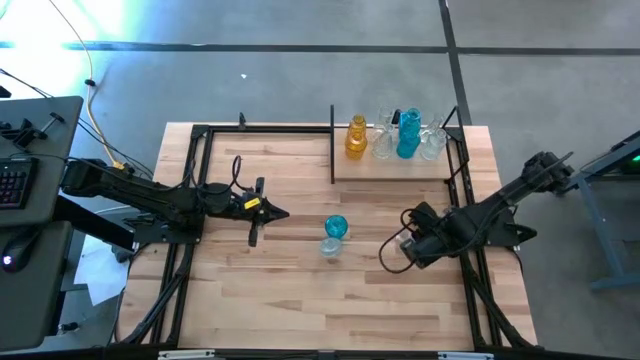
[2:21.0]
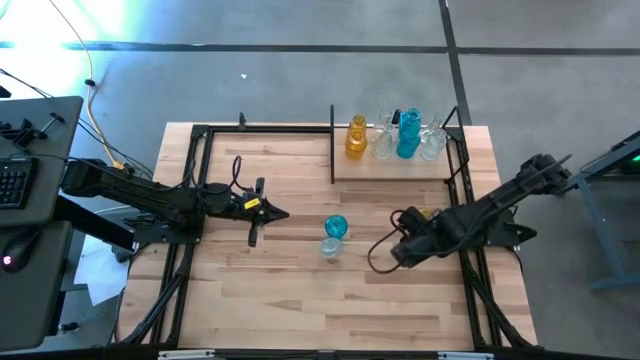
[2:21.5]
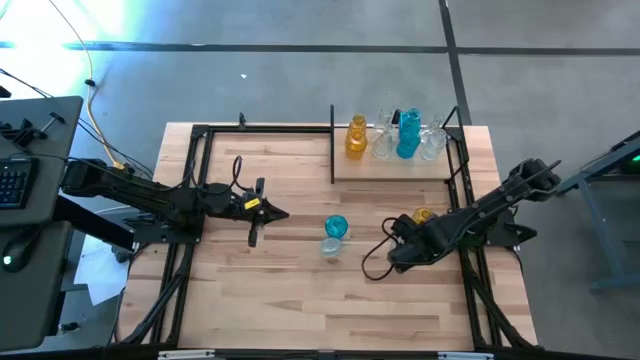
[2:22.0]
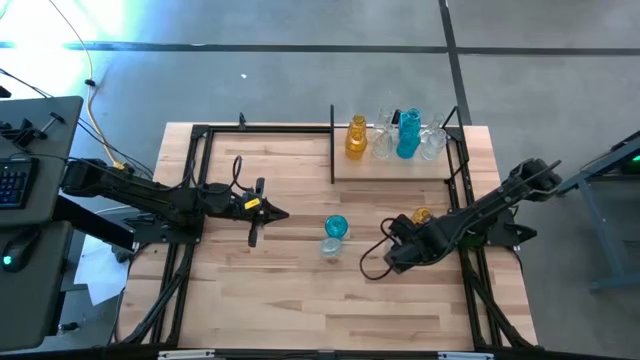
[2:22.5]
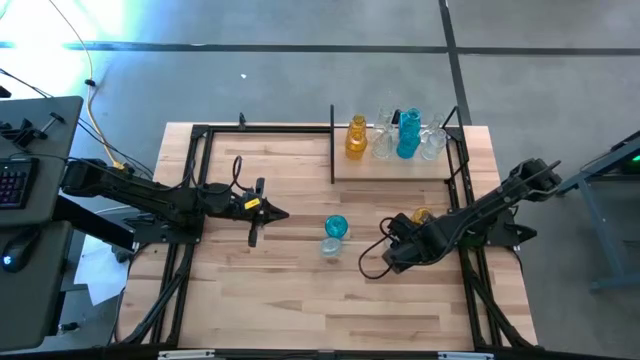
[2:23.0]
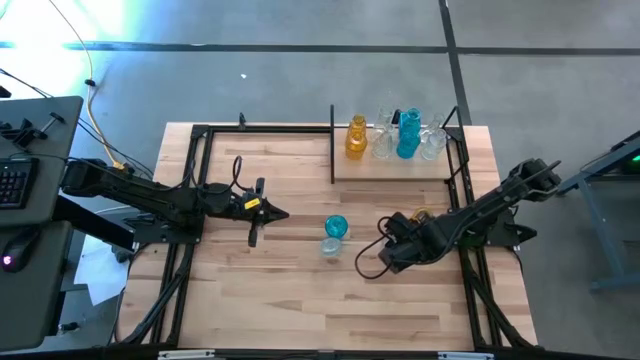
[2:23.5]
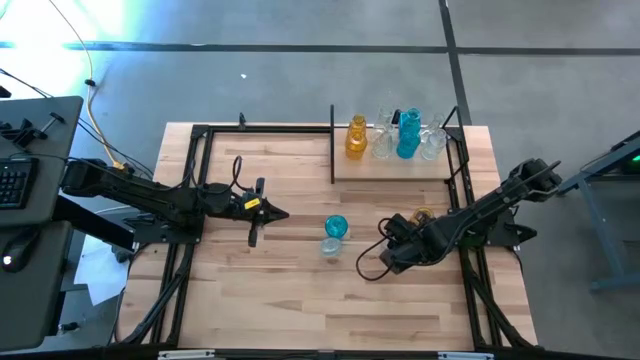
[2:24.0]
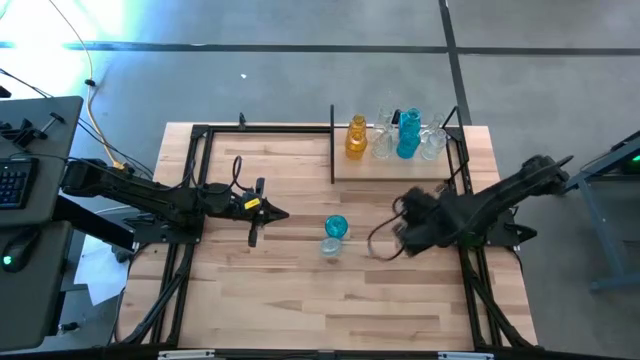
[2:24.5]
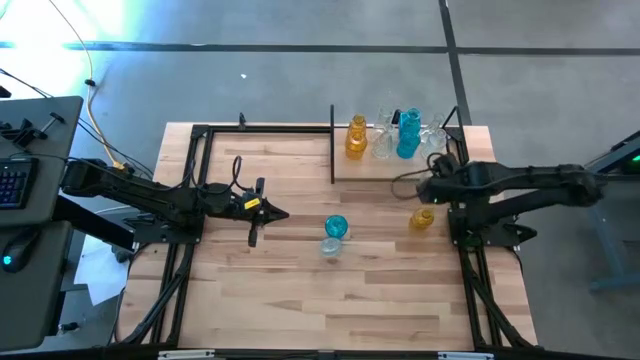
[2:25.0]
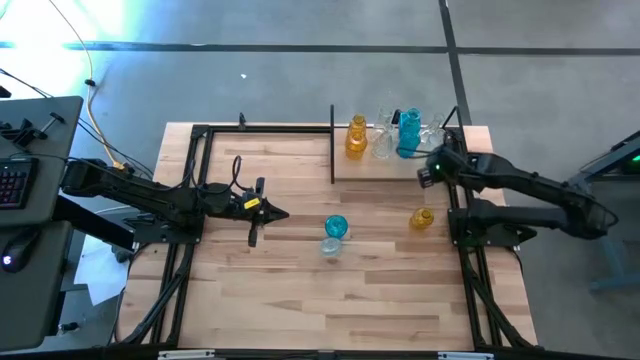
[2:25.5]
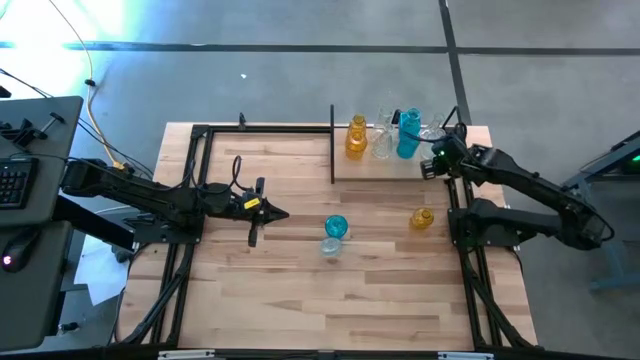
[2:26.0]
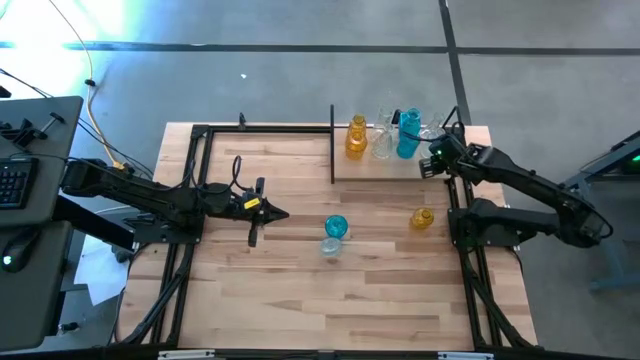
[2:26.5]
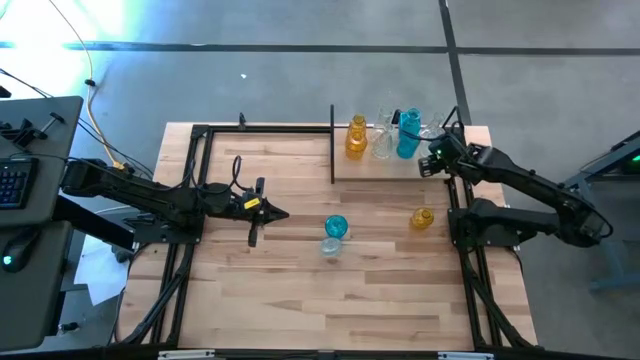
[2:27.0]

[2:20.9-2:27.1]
Task: sort vases onto shelf
Put the right transparent vase on the shelf aligned with the other transparent vase

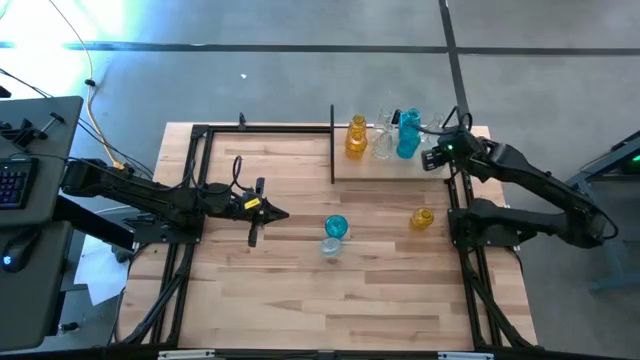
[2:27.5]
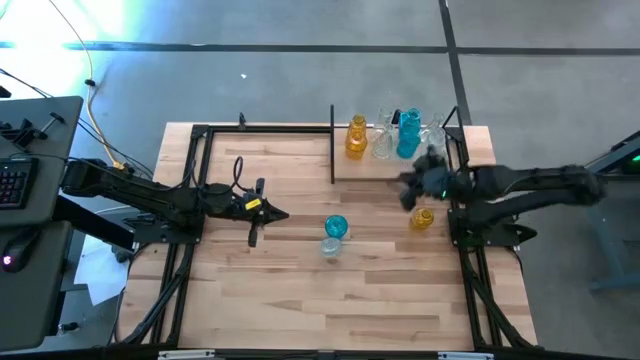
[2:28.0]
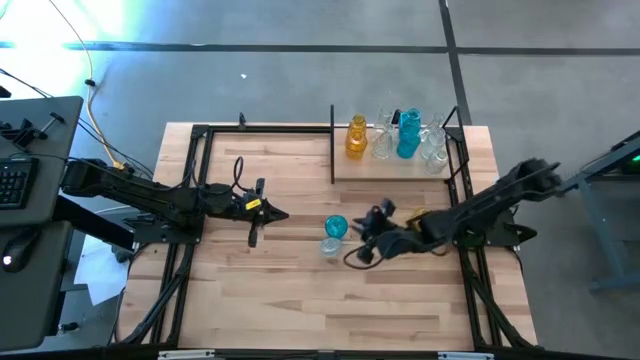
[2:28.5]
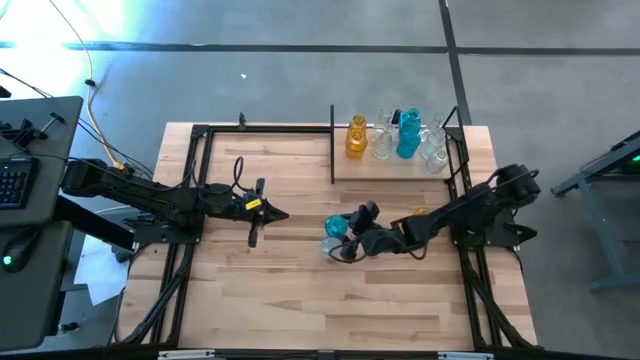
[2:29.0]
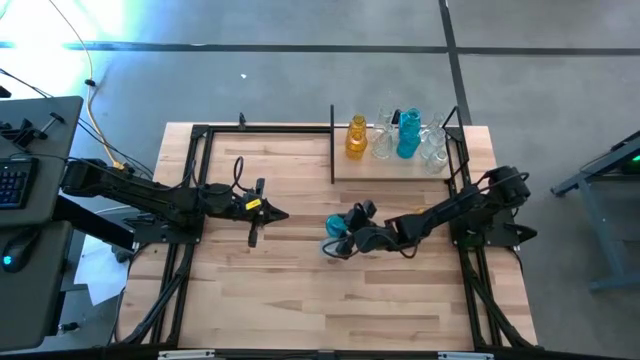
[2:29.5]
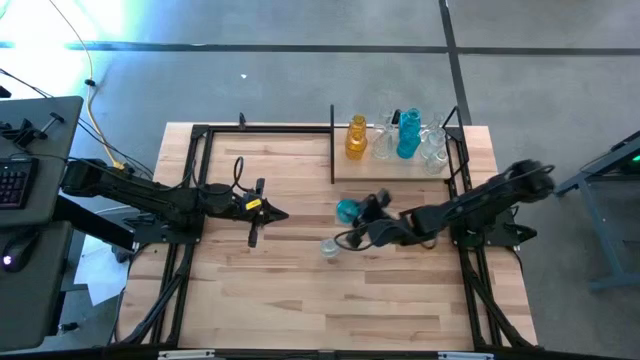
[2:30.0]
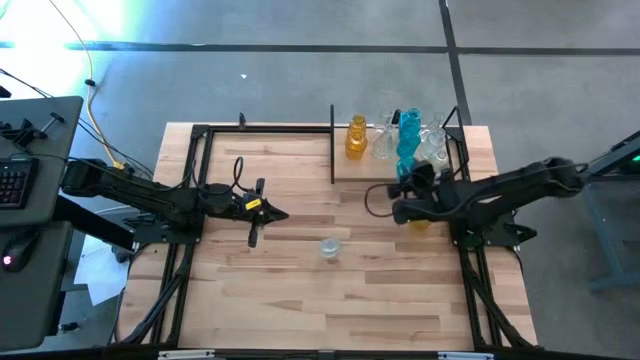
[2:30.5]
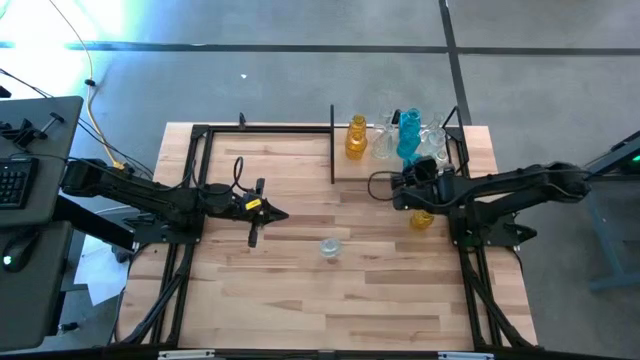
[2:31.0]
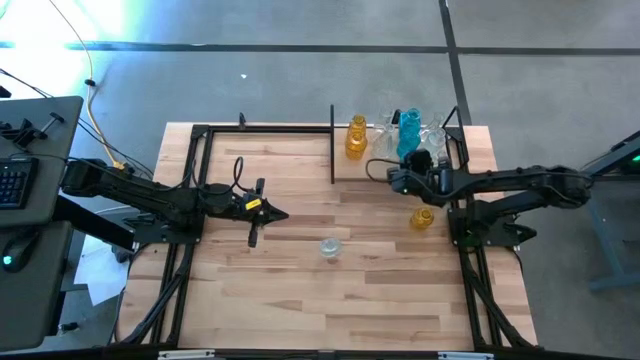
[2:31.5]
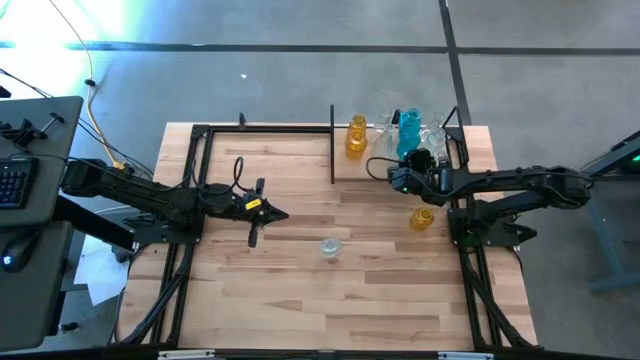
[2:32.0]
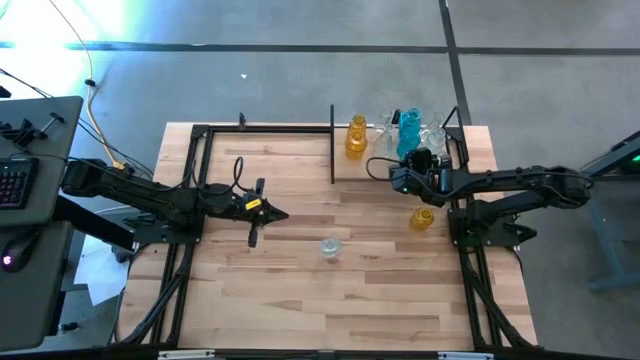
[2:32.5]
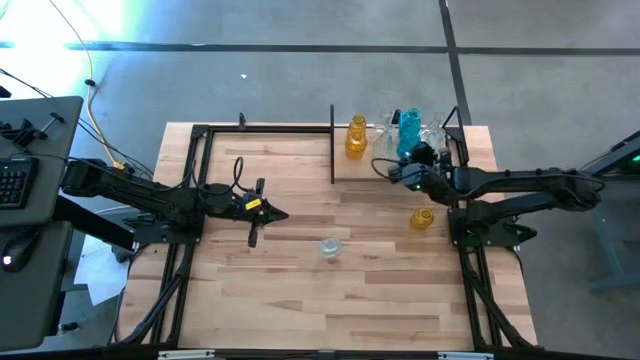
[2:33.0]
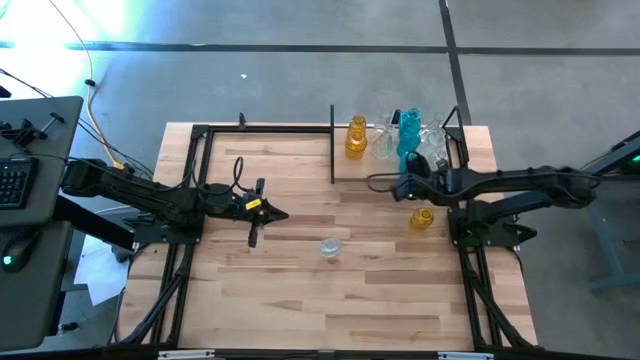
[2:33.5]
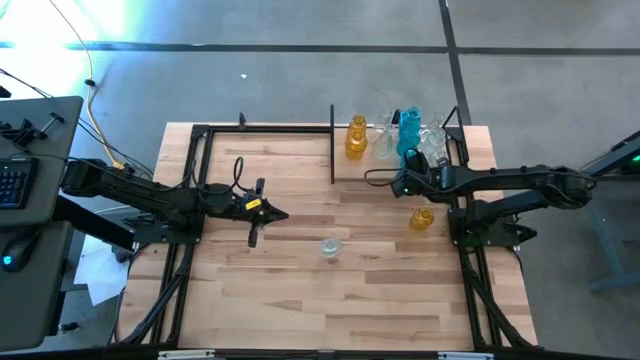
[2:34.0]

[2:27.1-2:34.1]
Put the blue vase on the shelf aligned with the other blue vase

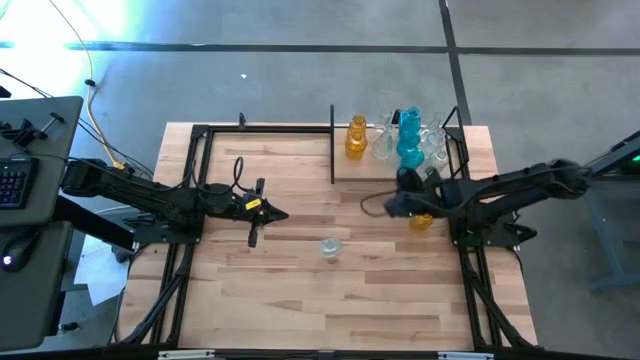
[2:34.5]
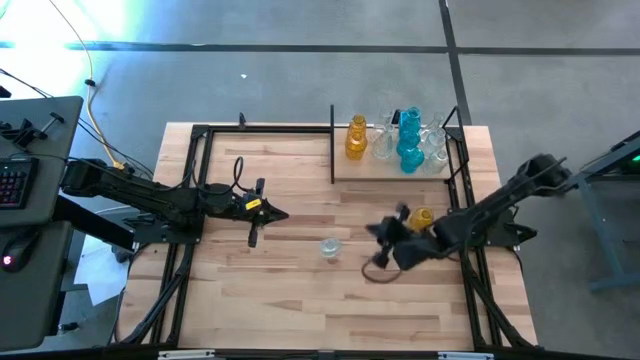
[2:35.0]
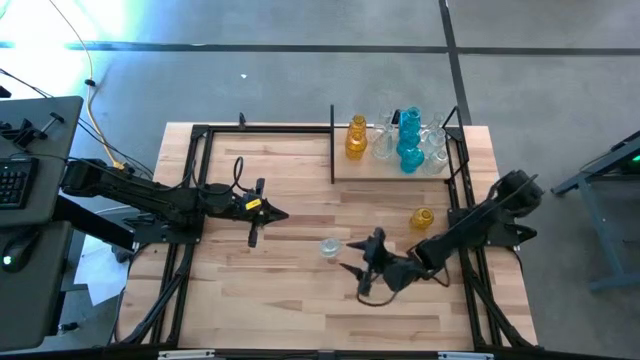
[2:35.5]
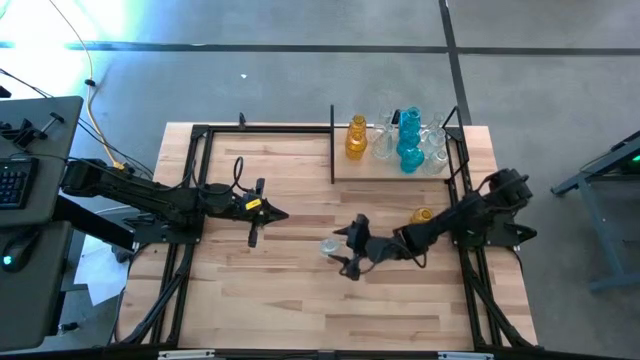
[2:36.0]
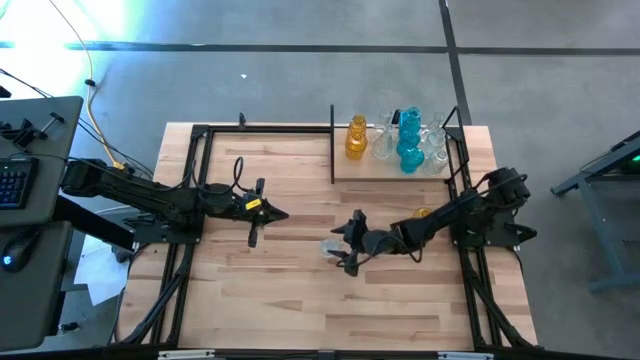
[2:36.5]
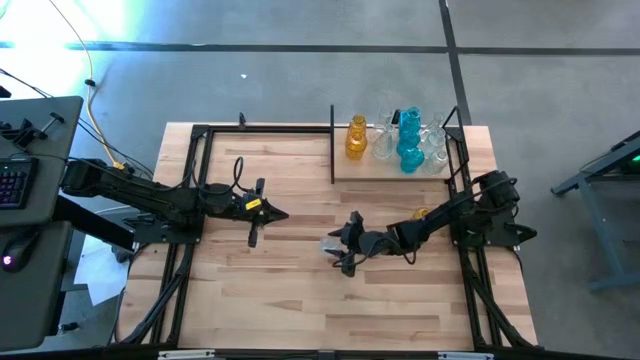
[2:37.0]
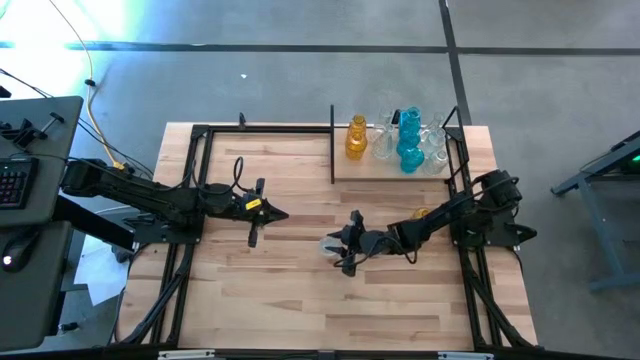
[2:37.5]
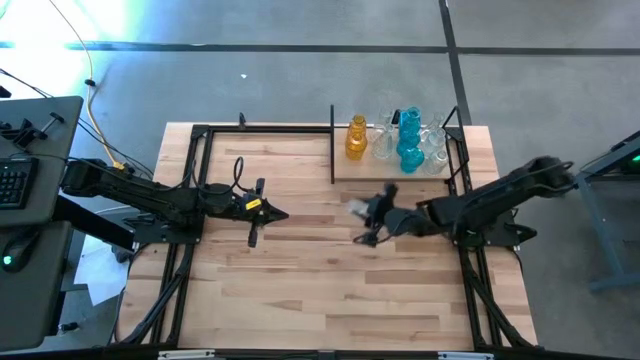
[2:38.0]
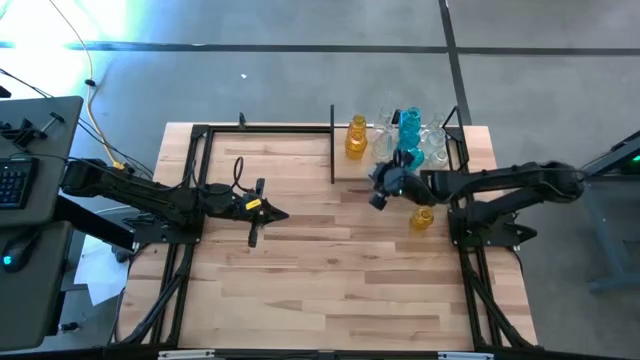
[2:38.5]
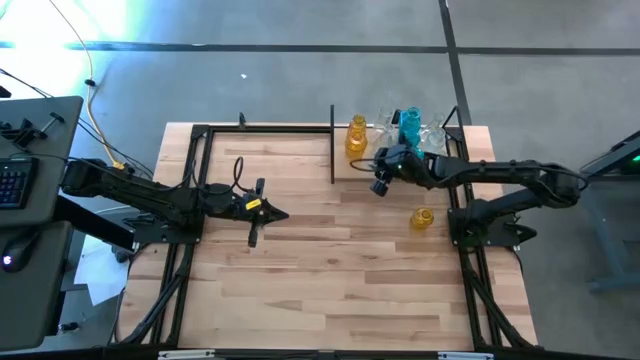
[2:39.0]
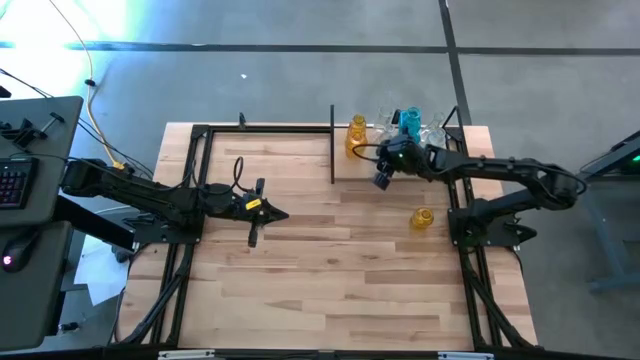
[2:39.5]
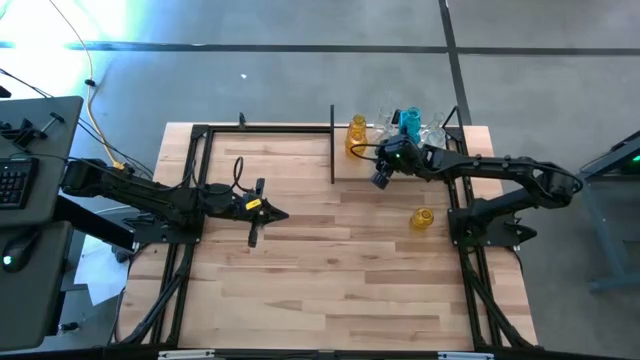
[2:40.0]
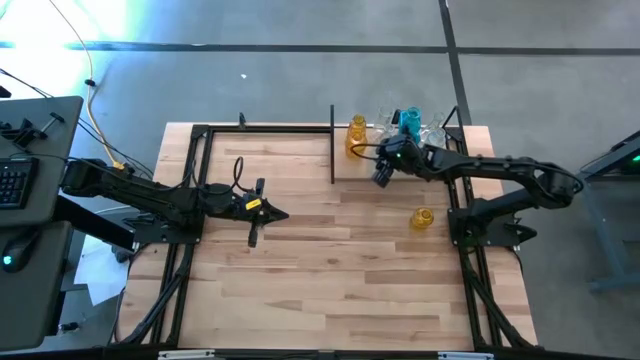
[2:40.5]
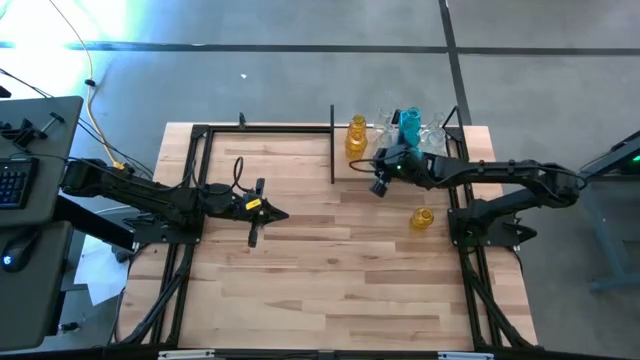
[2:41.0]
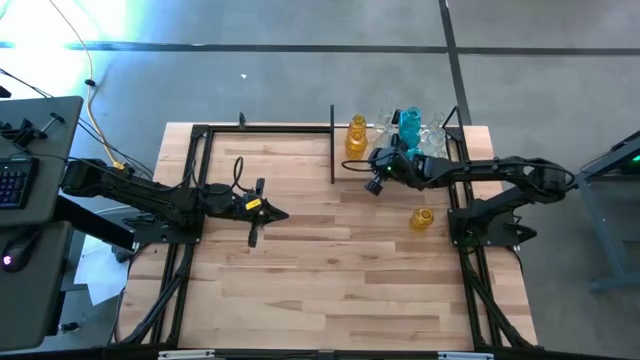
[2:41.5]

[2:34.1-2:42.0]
Put the transparent vase on the shelf aligned with the other transparent vase
